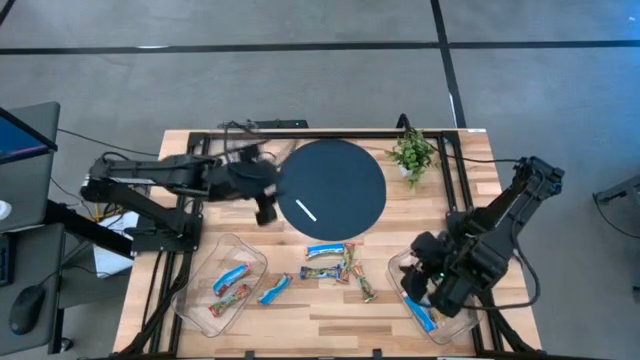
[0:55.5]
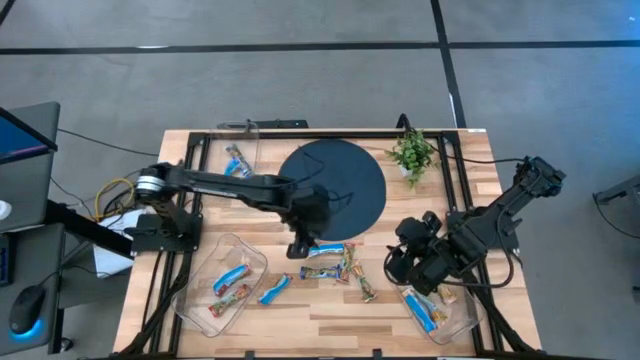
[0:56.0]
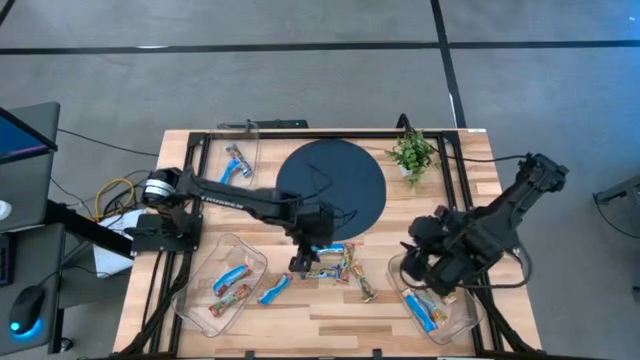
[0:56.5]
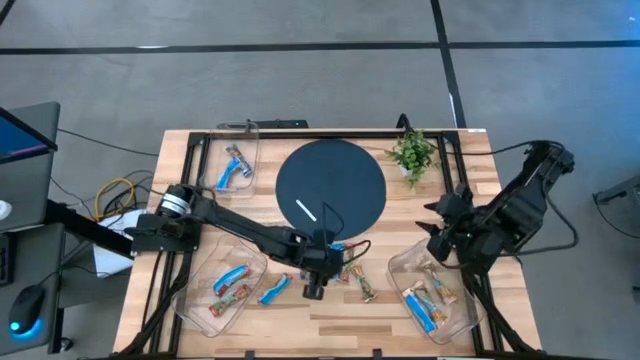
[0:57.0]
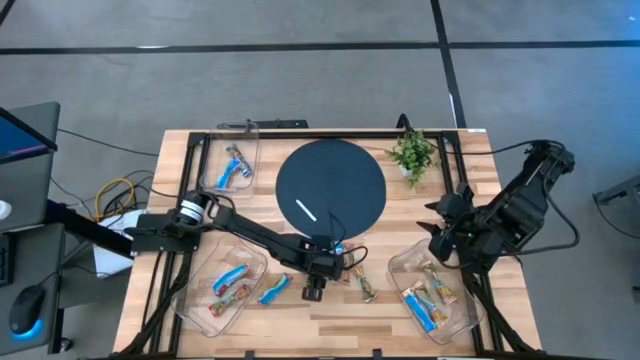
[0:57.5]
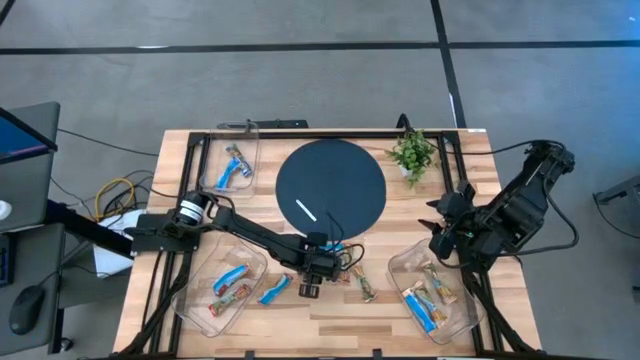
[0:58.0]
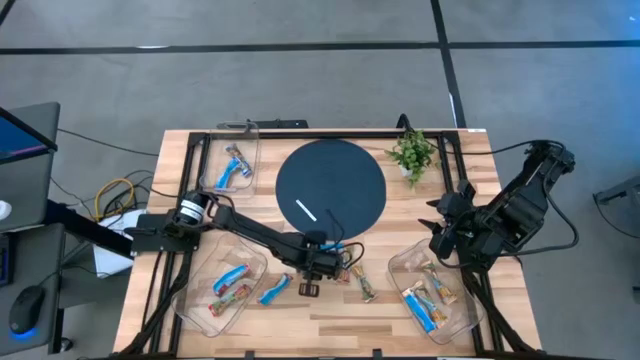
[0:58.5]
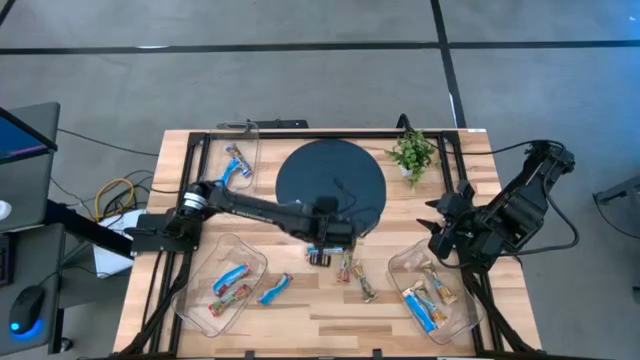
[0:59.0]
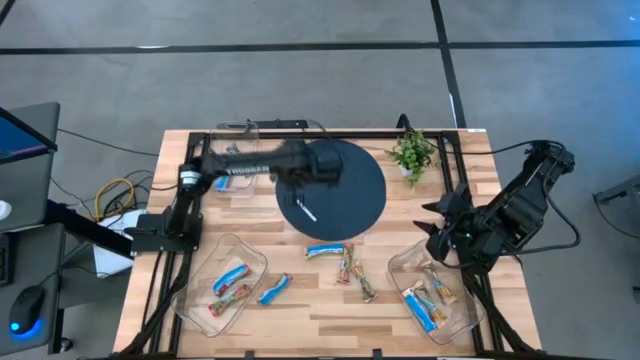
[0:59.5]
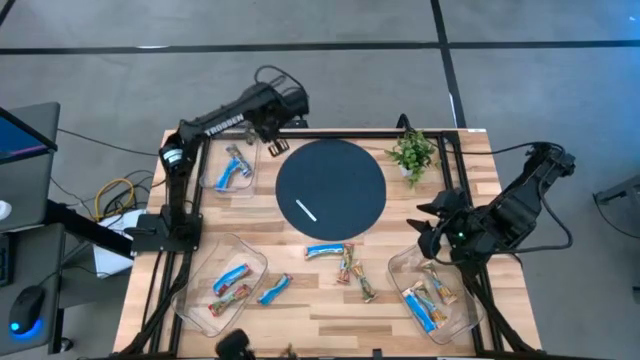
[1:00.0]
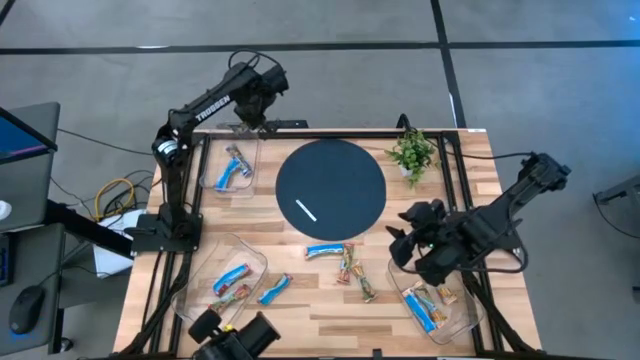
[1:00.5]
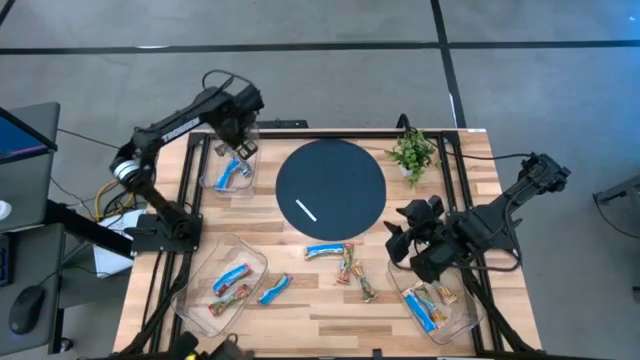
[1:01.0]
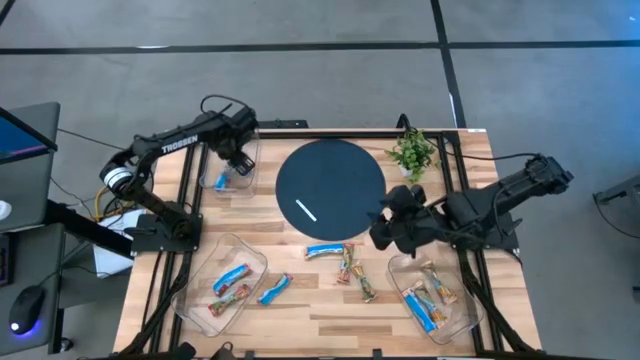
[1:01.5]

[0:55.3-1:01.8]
Task: Pick and place Granola Bars by type
Put the blue granola bar into the top transparent bin

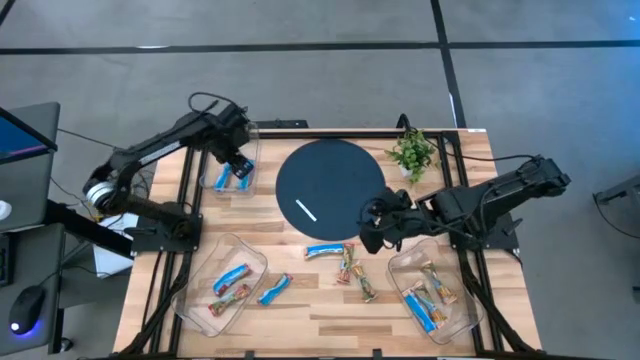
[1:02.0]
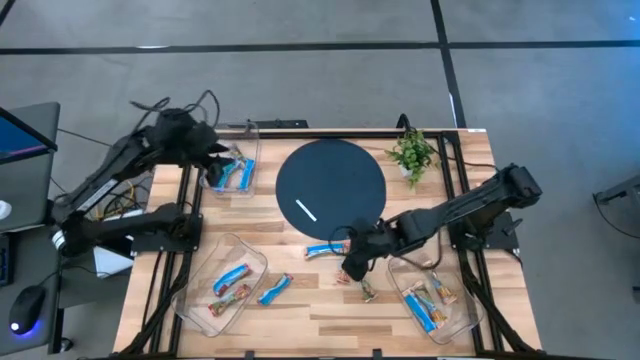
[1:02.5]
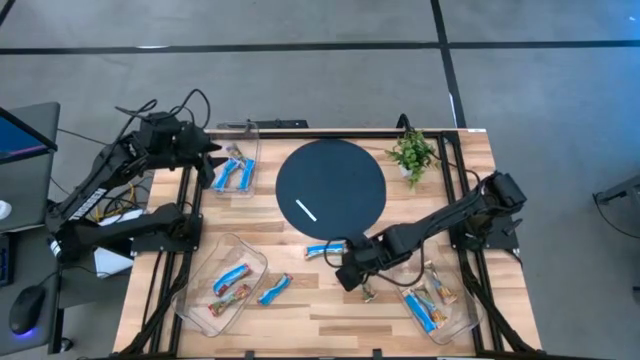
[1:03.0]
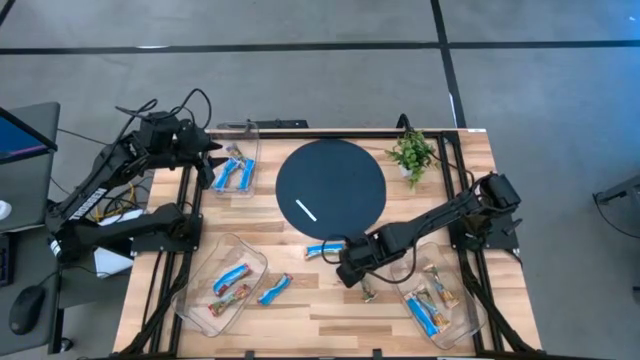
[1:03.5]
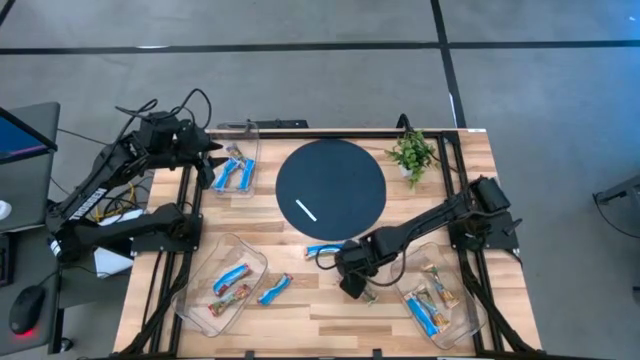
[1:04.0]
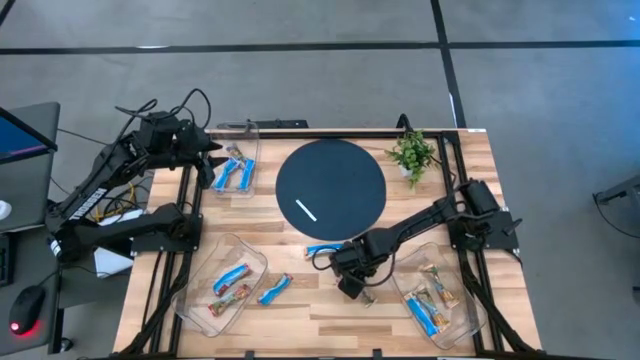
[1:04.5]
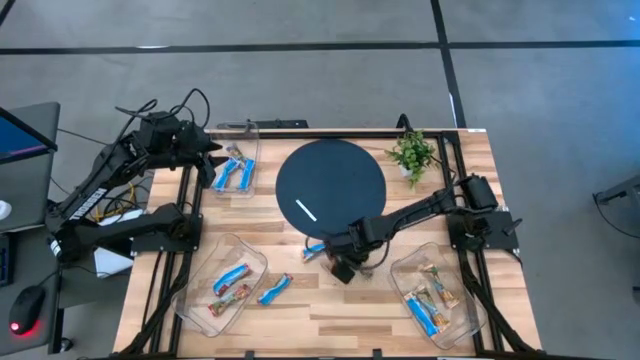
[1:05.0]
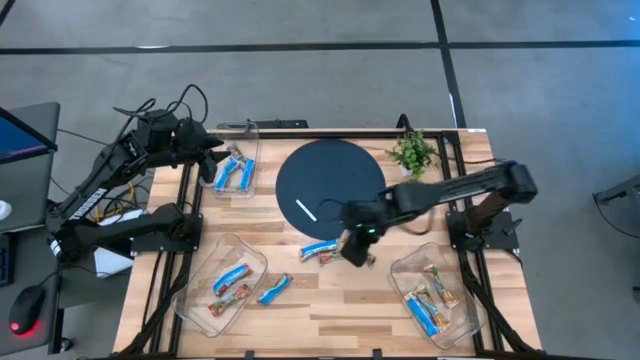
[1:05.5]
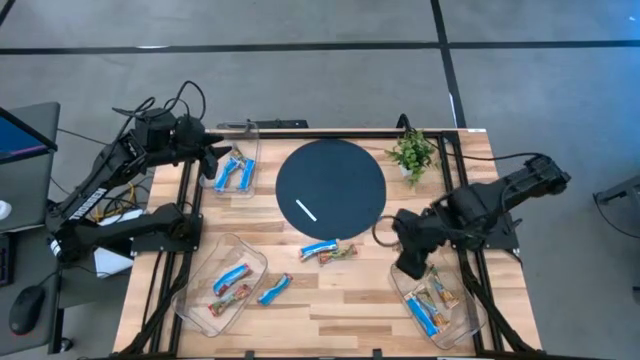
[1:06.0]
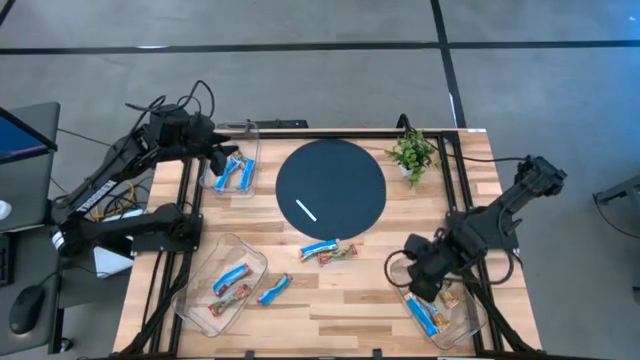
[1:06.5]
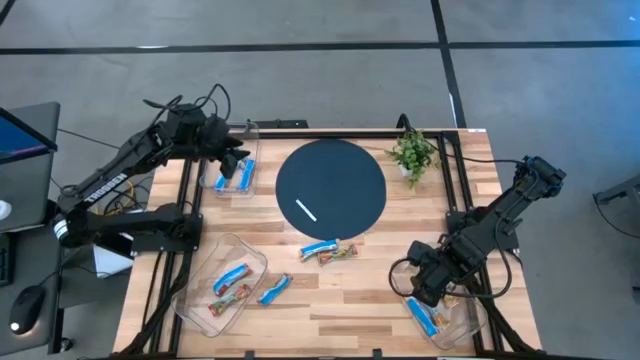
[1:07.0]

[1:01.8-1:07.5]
Put the yellow granola bar into the bottom right transparent bin

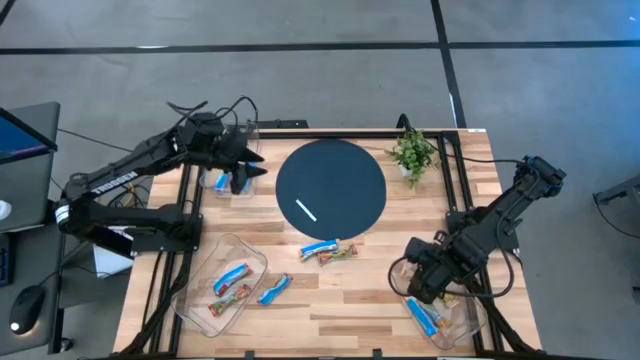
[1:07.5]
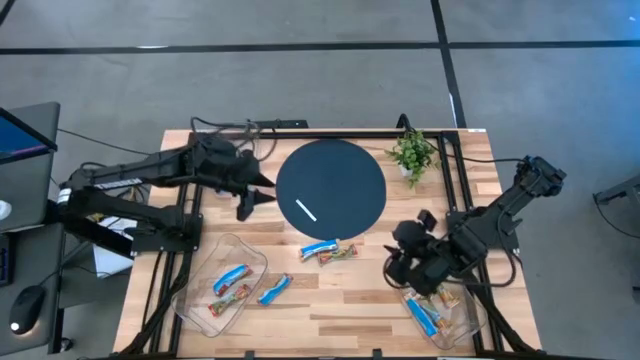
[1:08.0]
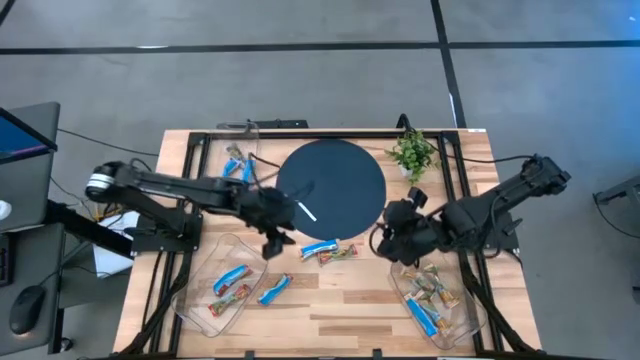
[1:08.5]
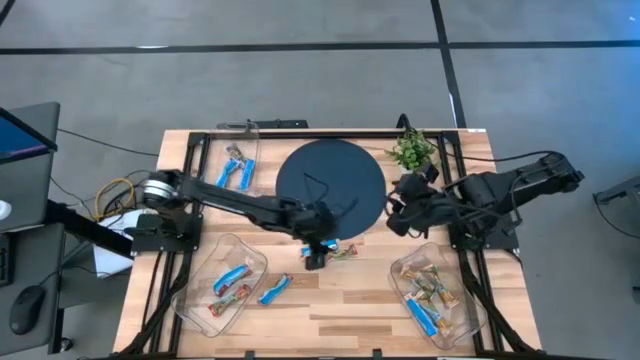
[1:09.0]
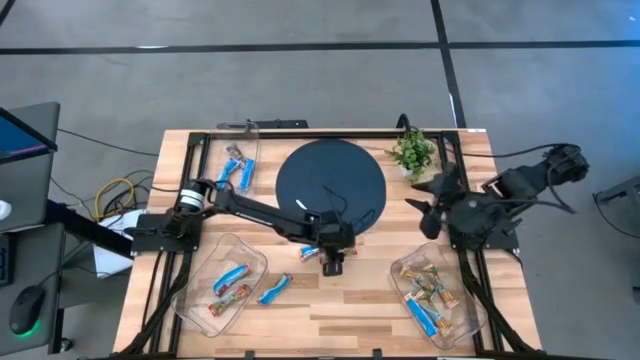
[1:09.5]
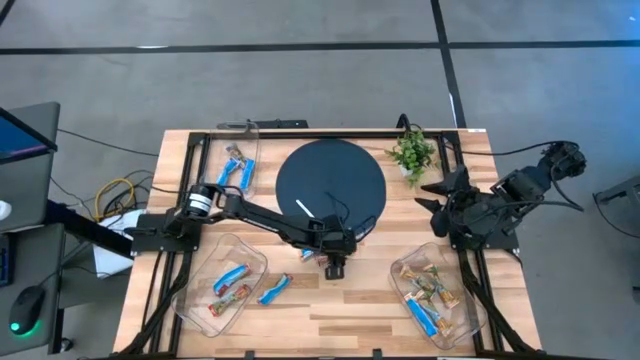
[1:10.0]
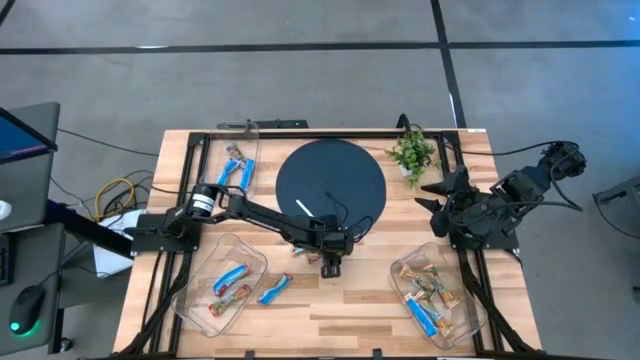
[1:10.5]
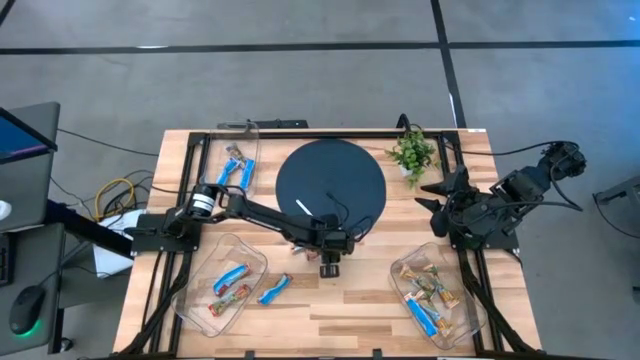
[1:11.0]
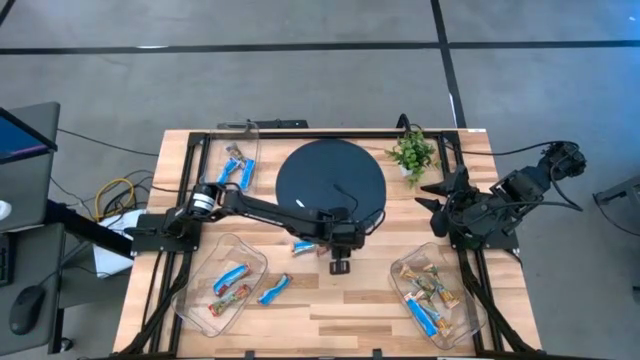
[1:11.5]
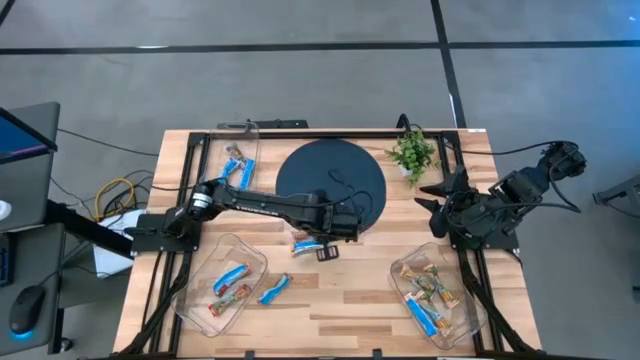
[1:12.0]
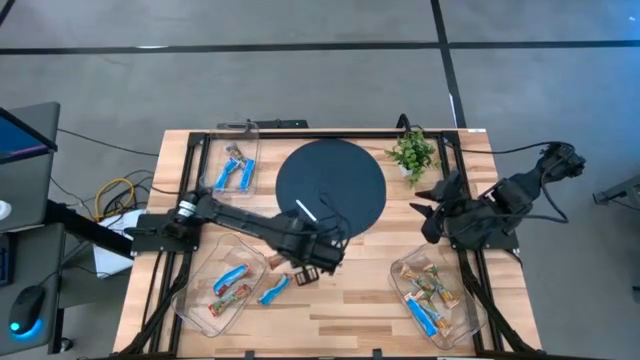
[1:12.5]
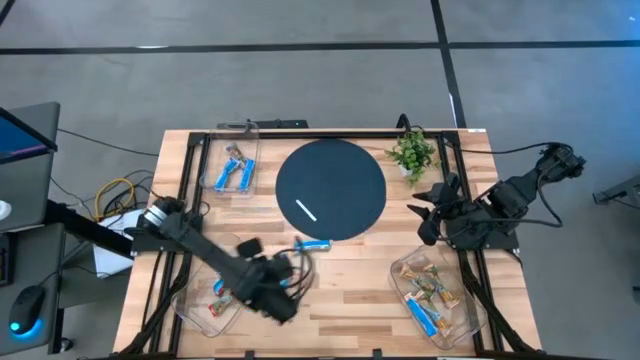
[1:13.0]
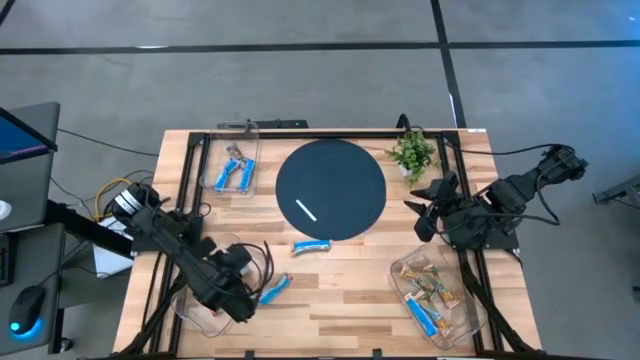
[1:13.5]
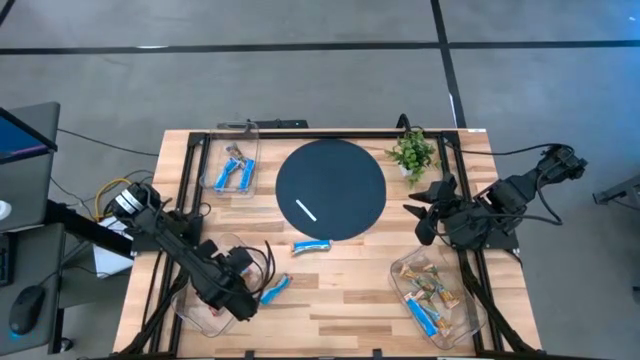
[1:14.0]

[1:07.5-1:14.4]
Put the red granola bar into the bottom left transparent bin

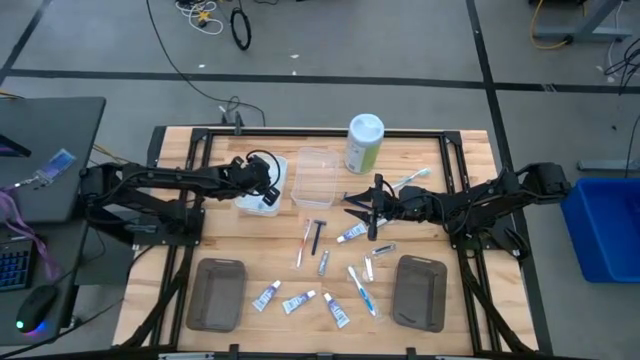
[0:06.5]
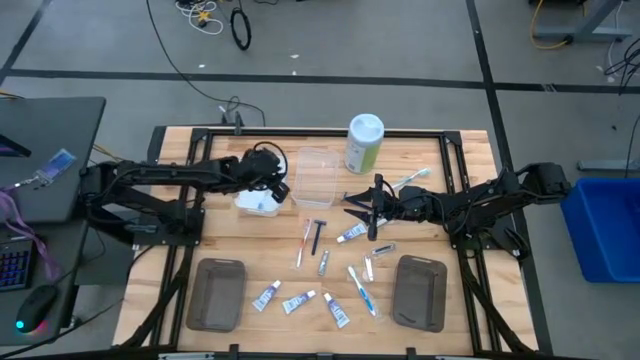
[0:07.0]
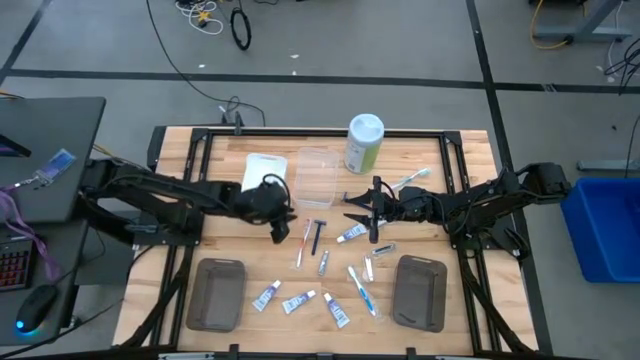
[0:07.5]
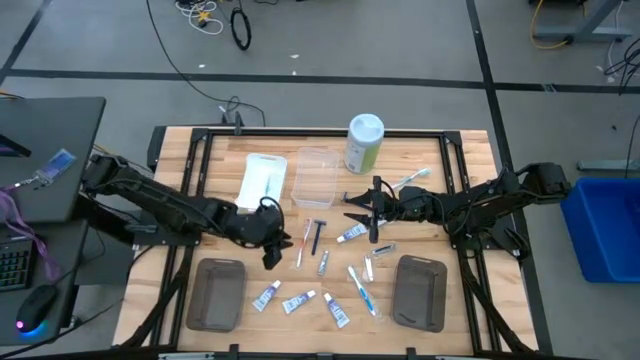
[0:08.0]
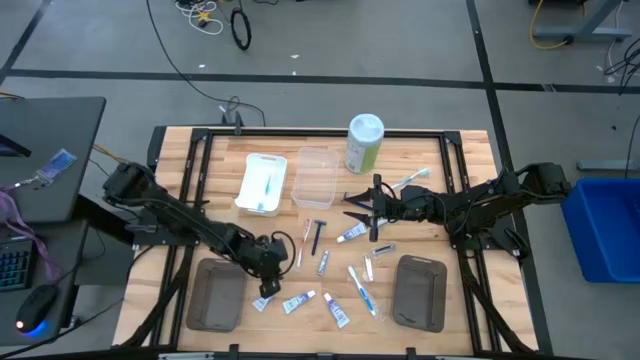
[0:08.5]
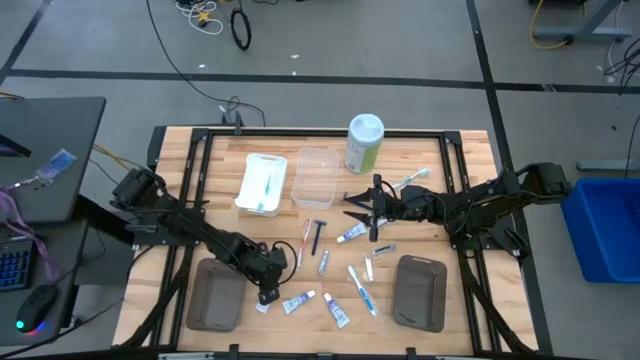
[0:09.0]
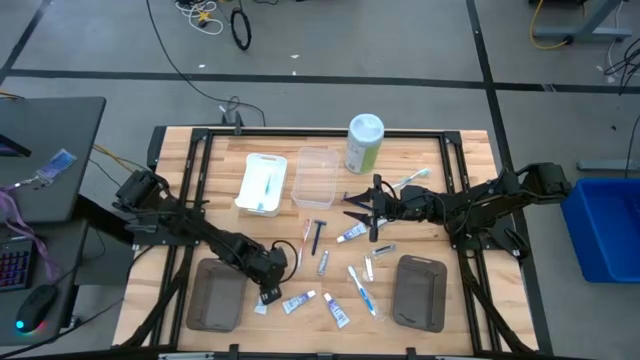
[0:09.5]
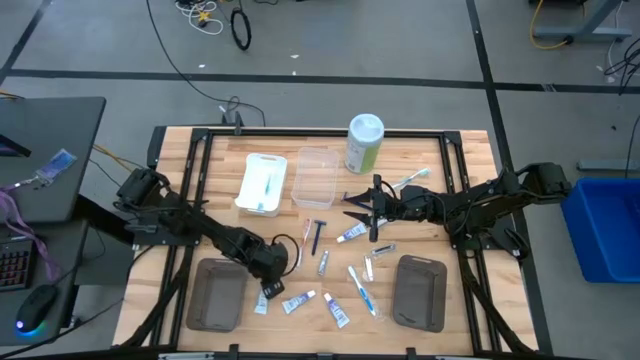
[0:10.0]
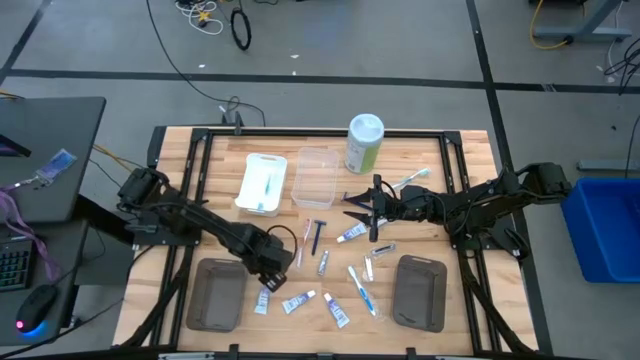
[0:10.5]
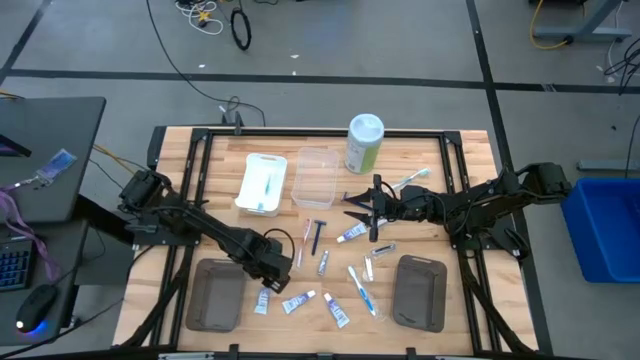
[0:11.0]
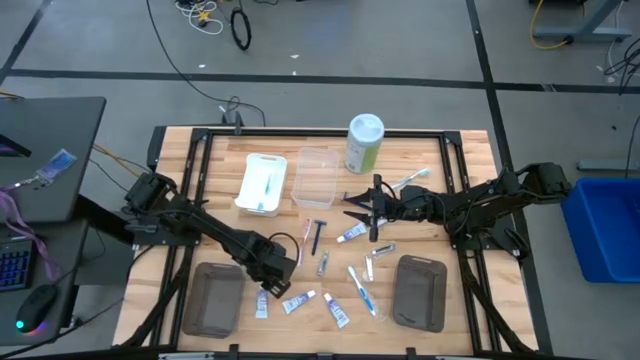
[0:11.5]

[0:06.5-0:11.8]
Task: Pick & Place Travel size toiletries
Put the white toothpaste into the left black bin
